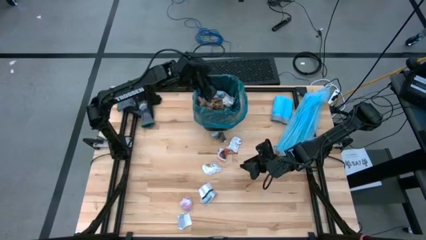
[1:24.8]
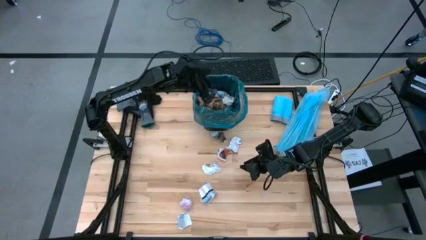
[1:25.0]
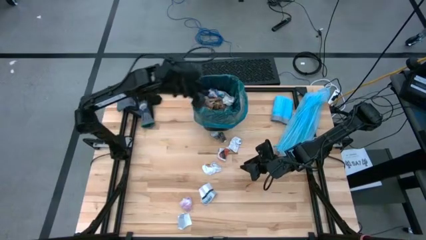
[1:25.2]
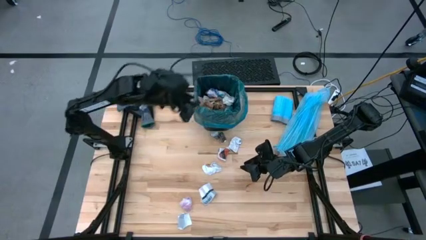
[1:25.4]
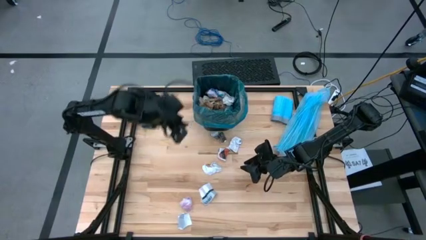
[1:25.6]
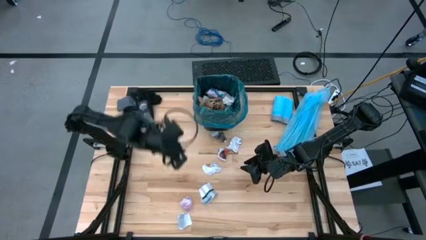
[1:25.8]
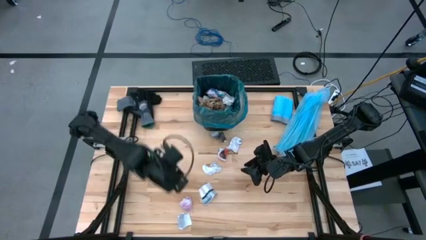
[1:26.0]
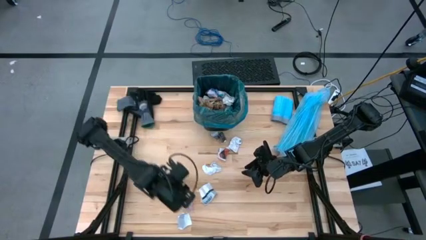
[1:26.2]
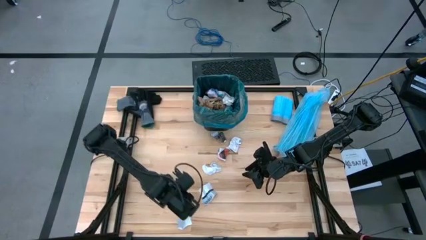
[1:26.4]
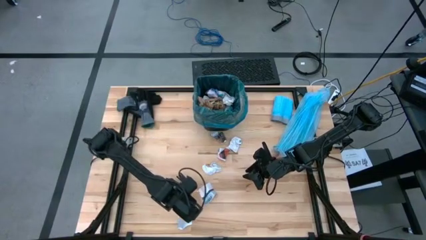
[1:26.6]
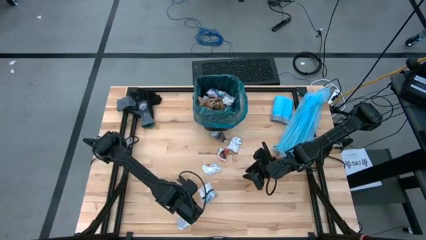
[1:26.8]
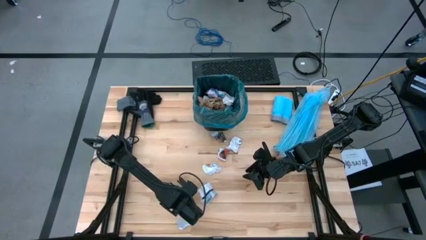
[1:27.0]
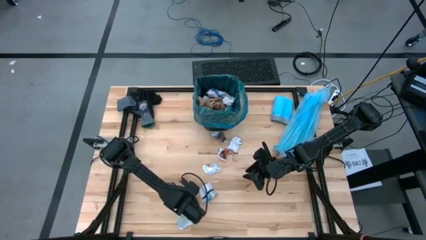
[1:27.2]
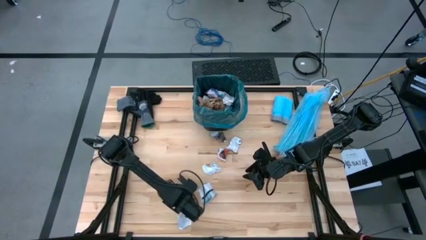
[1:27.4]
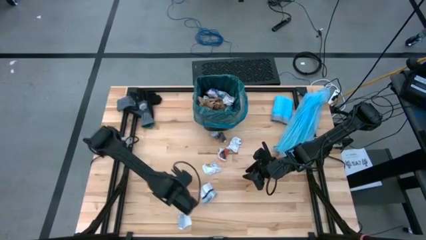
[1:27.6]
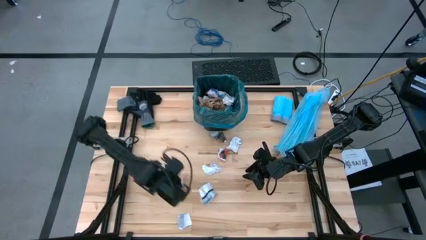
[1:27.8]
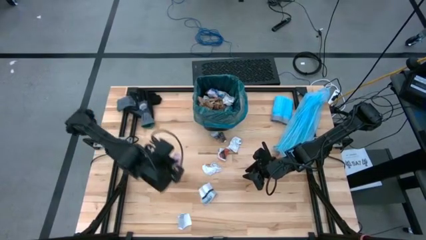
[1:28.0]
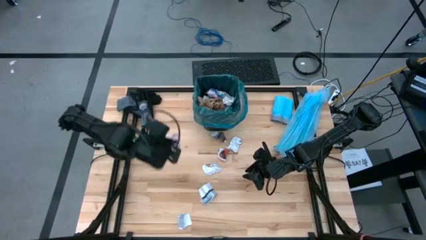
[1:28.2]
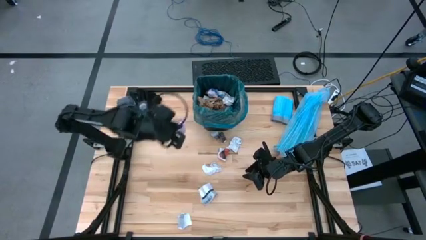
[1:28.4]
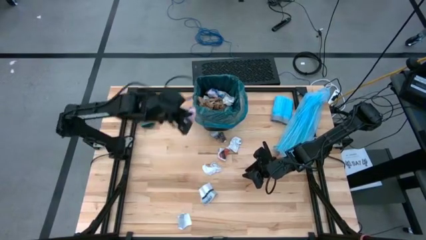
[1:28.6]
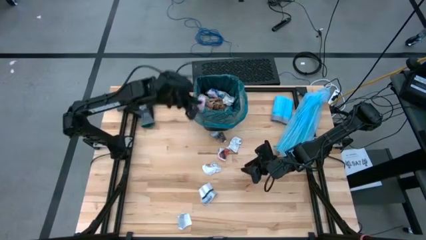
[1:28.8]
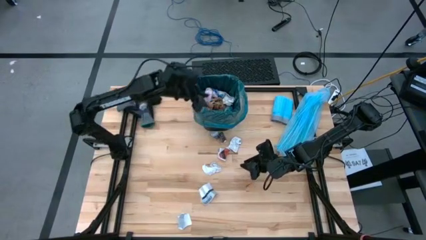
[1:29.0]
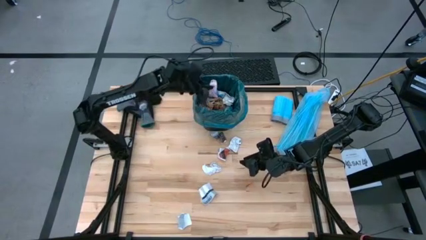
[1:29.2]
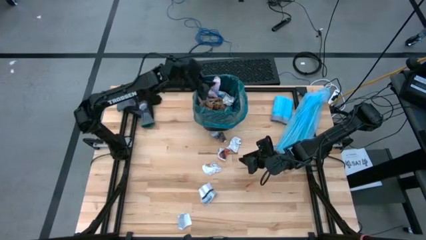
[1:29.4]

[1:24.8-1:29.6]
Task: place trash/remove bag and relplace
Put the pink plastic into the trash bin

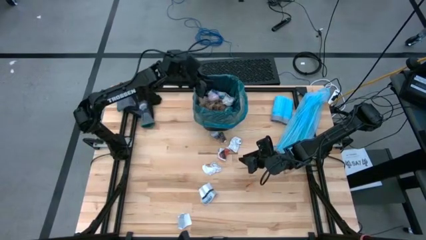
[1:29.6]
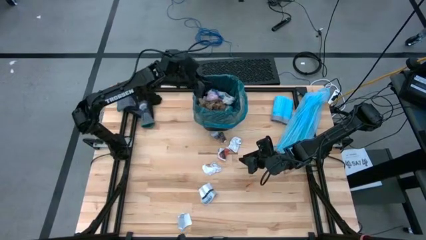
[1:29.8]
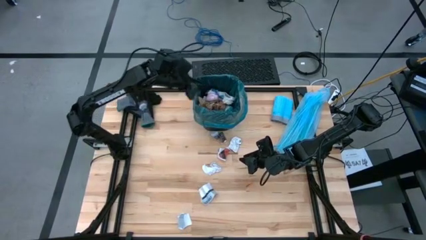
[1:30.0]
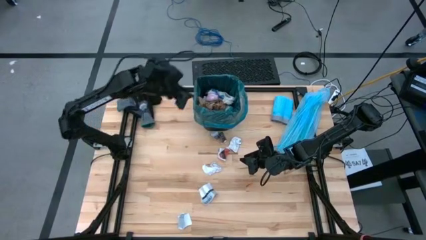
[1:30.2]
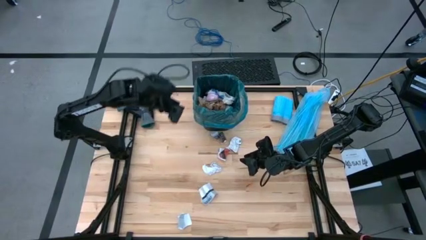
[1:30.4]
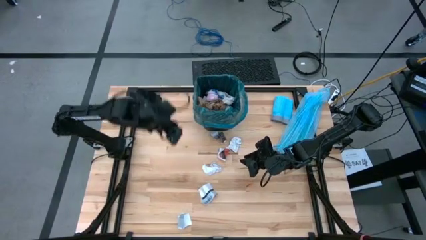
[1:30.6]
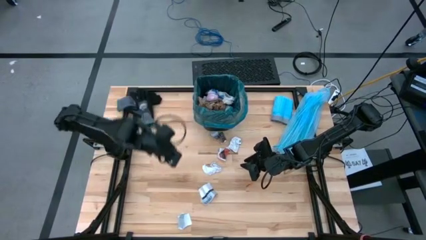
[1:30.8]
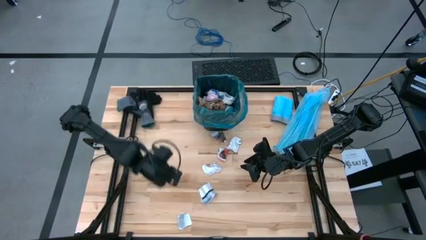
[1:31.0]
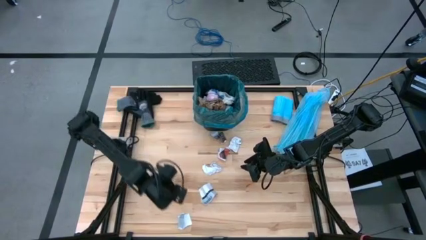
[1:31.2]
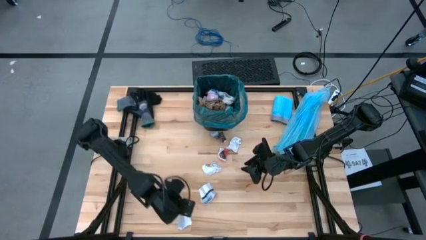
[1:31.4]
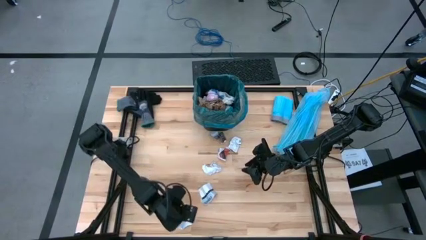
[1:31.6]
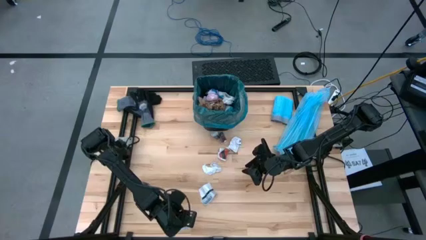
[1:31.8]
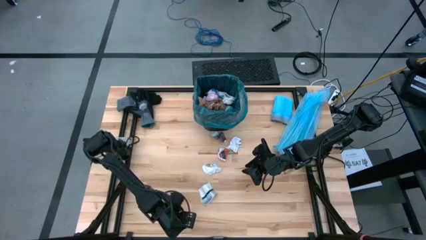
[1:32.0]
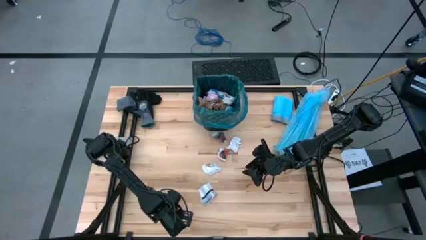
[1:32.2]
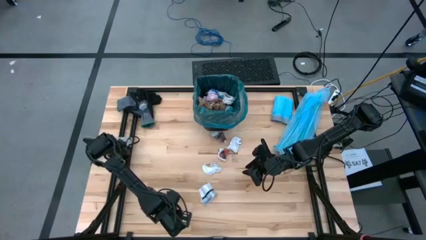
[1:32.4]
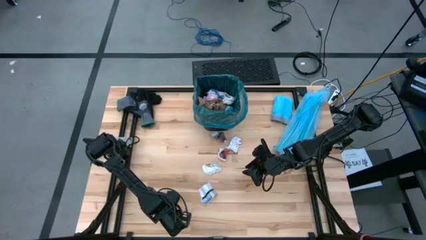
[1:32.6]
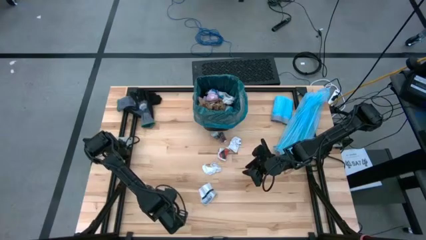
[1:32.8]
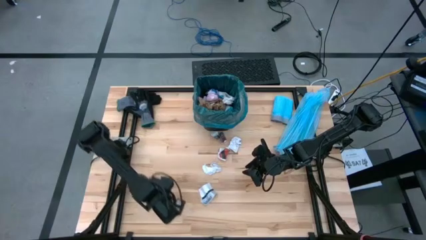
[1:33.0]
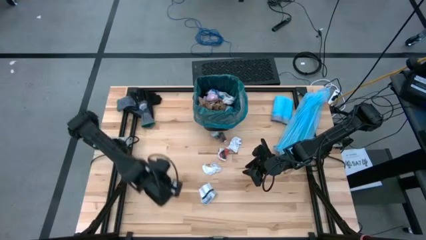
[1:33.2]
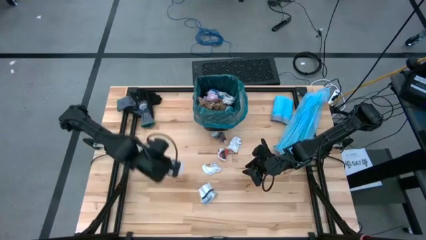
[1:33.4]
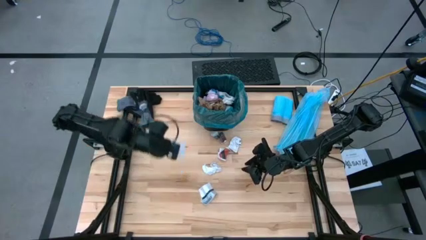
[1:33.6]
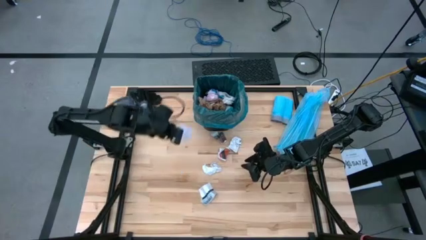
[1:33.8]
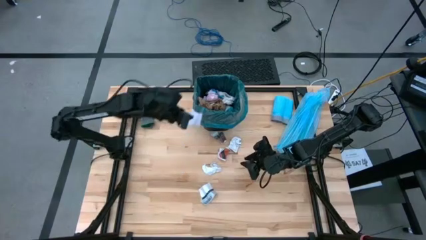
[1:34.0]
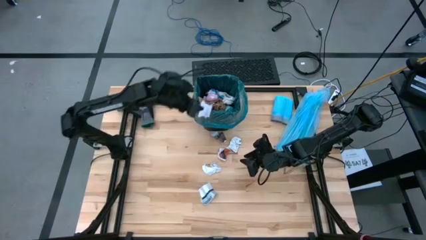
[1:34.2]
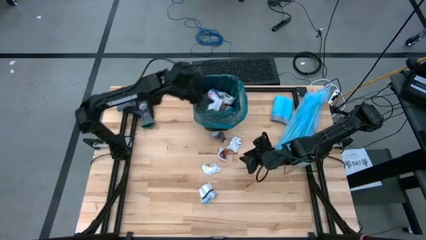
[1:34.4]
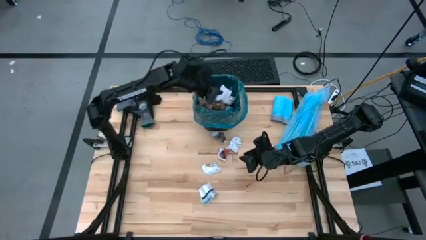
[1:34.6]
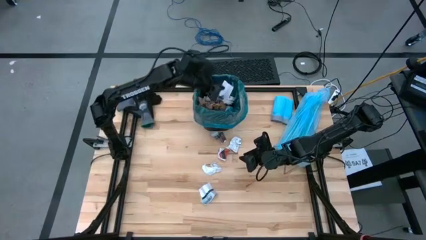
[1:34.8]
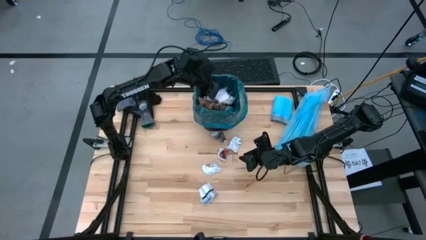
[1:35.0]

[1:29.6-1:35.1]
Put the white paper into the trash bin

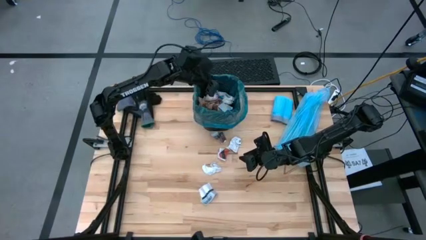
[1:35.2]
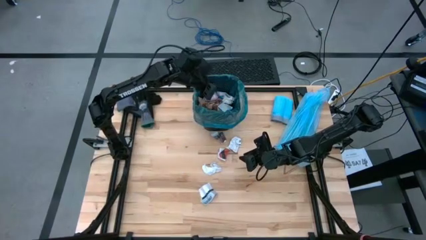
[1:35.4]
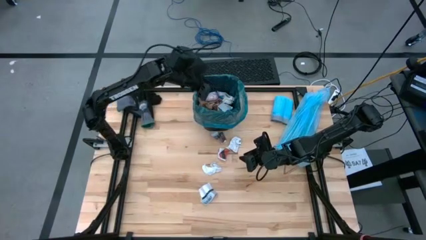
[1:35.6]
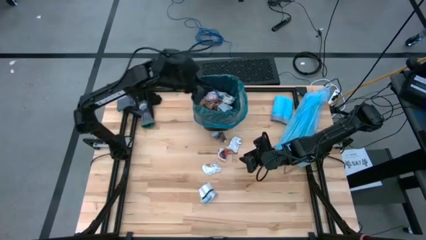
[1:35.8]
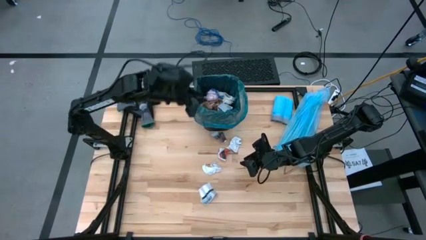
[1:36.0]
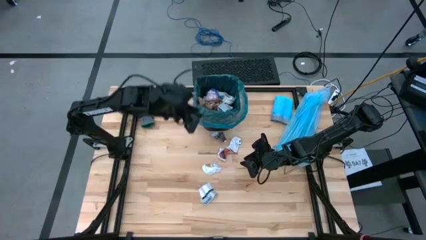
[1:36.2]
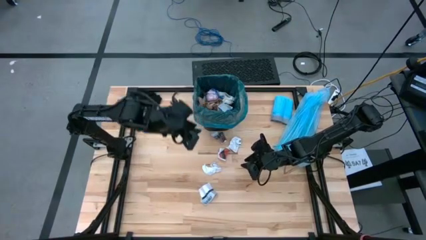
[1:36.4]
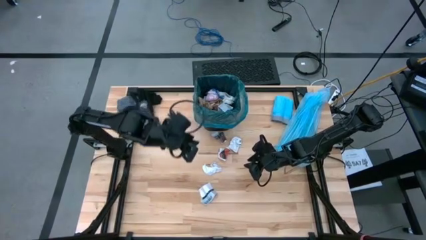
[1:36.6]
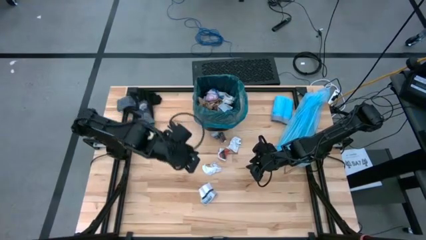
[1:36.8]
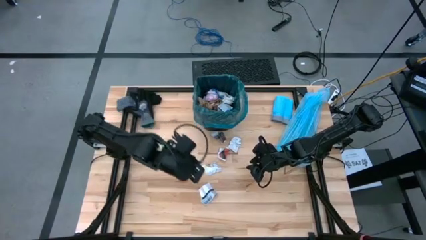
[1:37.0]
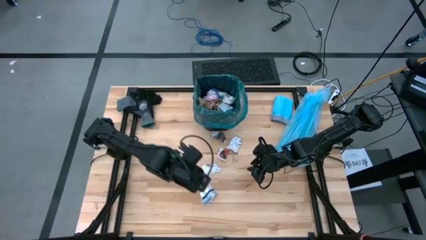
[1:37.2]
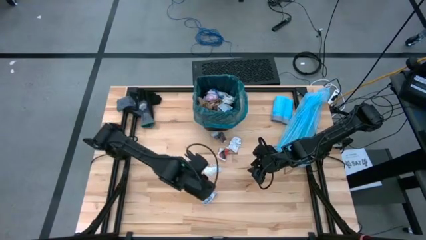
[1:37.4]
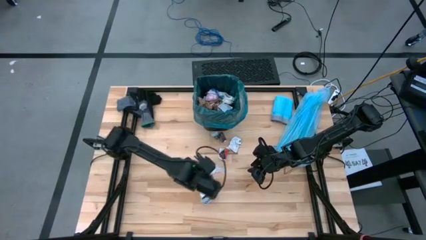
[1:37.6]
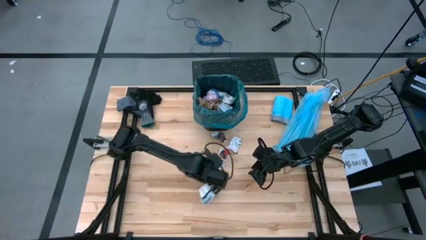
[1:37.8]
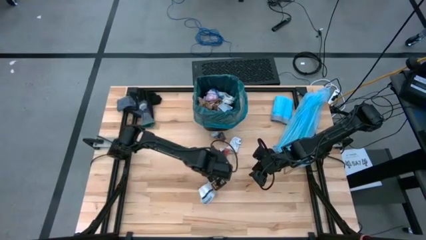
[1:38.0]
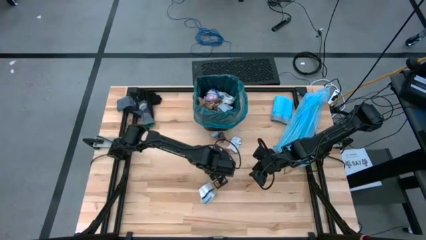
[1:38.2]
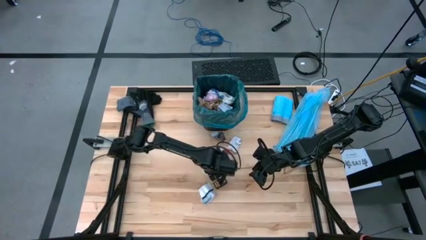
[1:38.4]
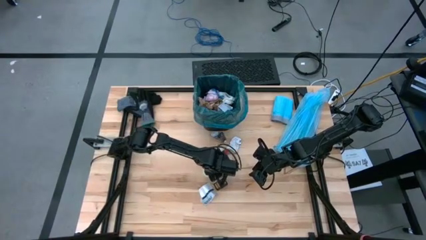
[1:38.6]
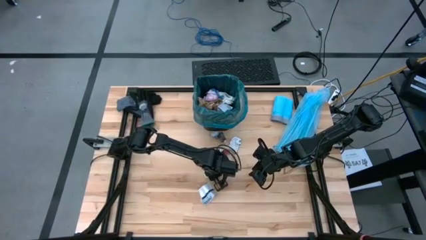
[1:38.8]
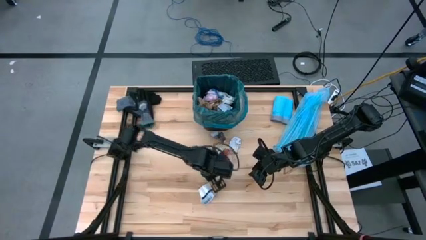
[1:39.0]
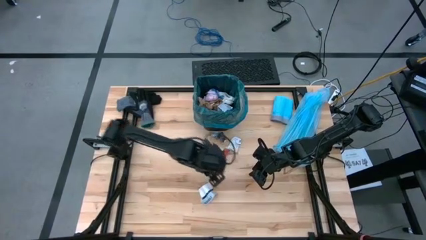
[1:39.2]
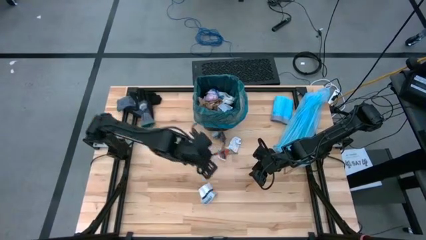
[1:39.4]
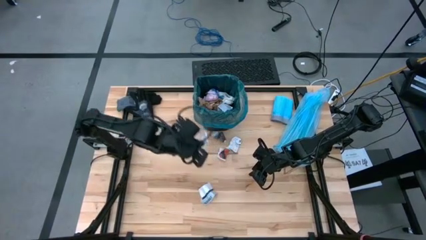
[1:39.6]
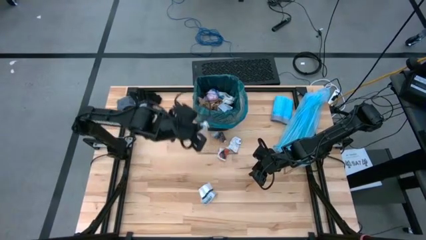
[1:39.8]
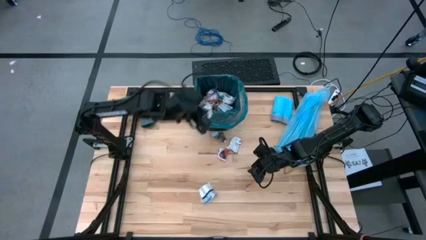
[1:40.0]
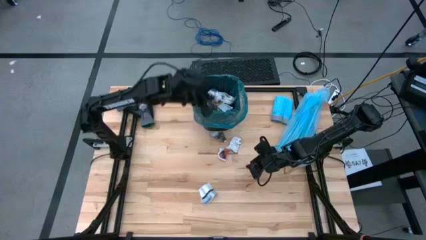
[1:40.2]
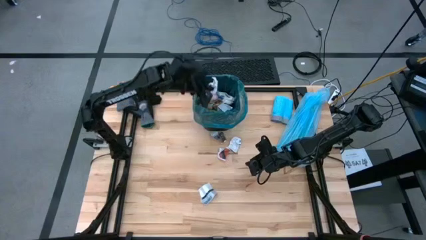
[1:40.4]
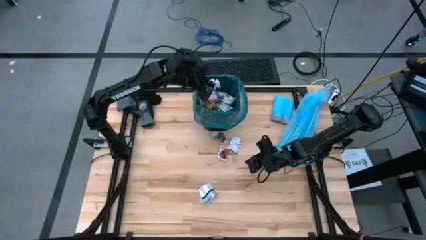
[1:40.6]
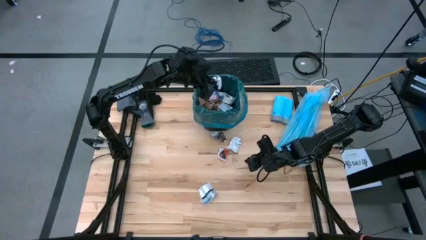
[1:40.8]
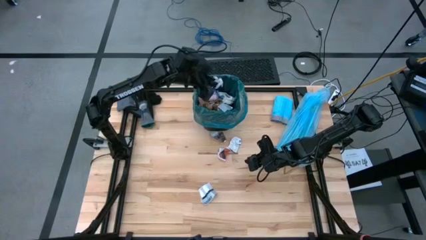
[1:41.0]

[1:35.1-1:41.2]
Put the white paper into the trash bin
